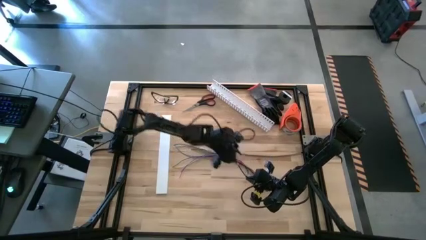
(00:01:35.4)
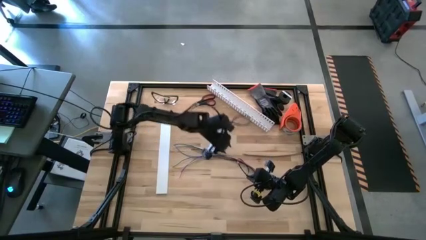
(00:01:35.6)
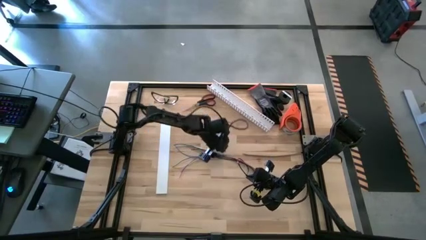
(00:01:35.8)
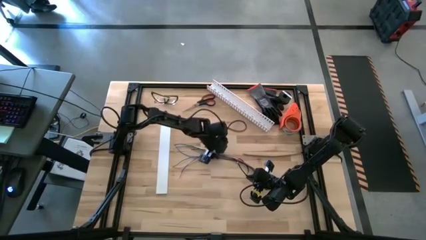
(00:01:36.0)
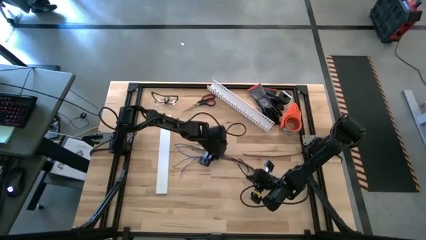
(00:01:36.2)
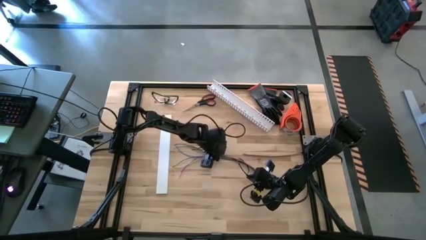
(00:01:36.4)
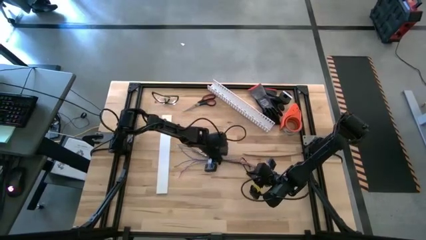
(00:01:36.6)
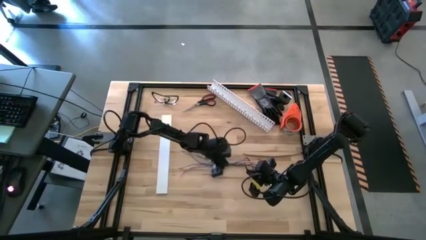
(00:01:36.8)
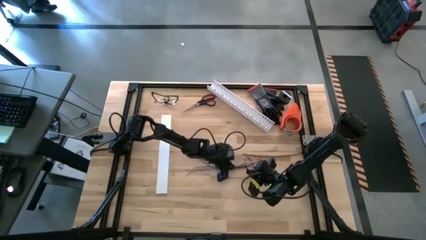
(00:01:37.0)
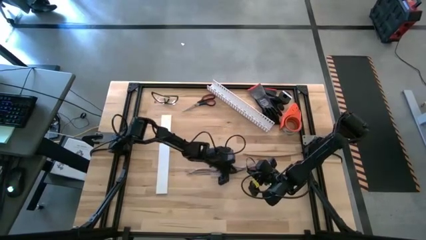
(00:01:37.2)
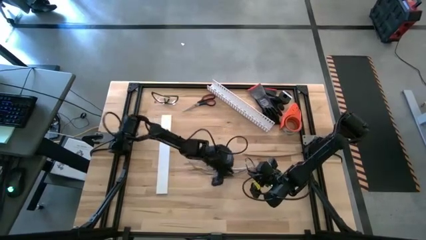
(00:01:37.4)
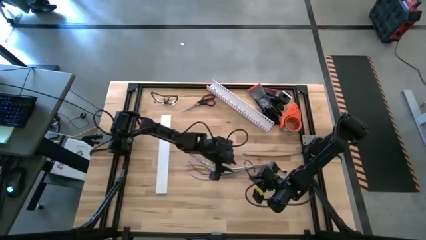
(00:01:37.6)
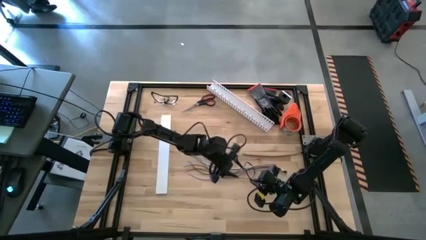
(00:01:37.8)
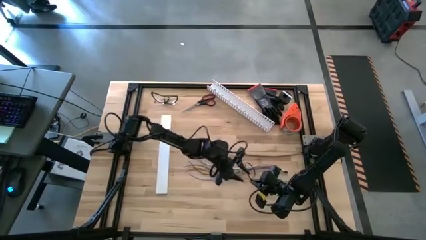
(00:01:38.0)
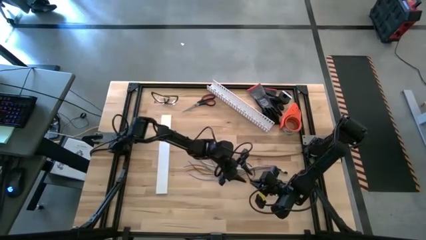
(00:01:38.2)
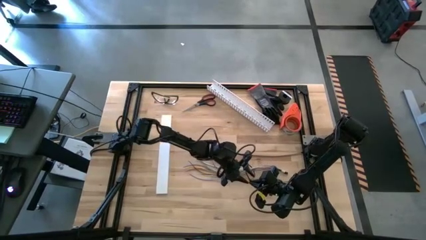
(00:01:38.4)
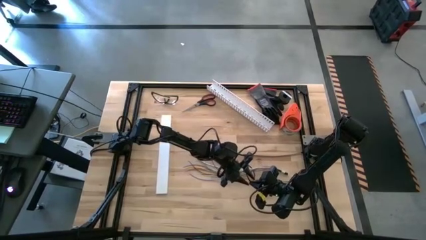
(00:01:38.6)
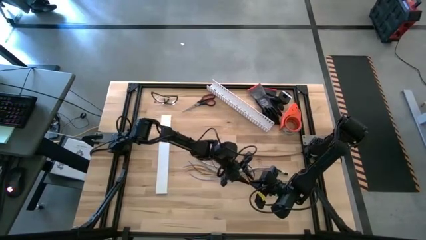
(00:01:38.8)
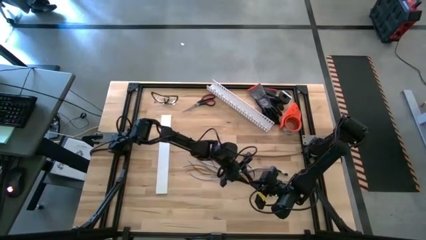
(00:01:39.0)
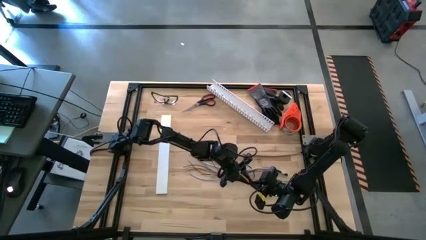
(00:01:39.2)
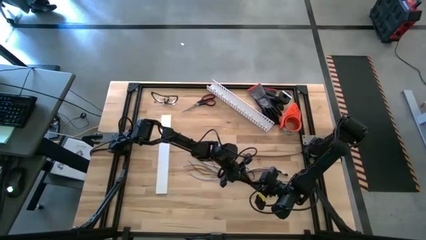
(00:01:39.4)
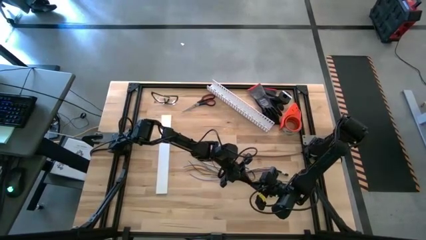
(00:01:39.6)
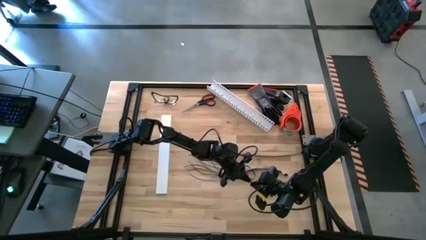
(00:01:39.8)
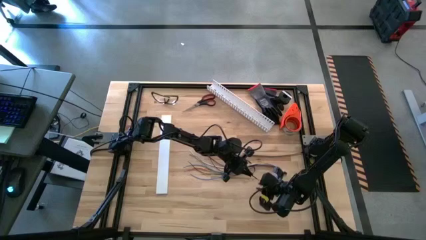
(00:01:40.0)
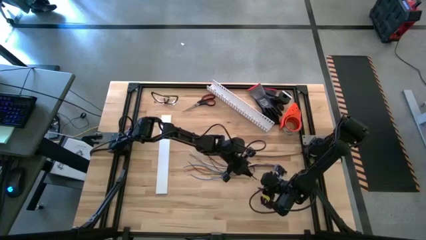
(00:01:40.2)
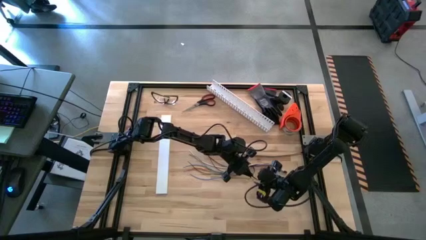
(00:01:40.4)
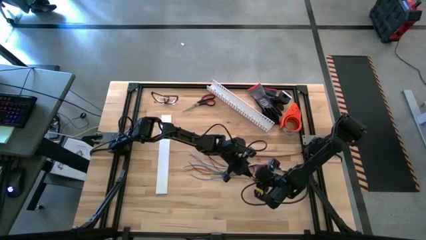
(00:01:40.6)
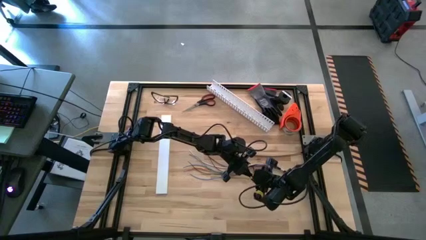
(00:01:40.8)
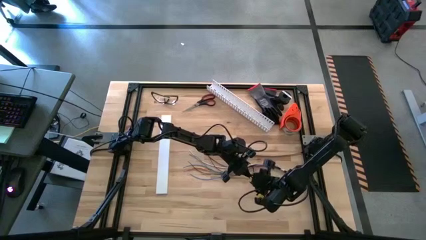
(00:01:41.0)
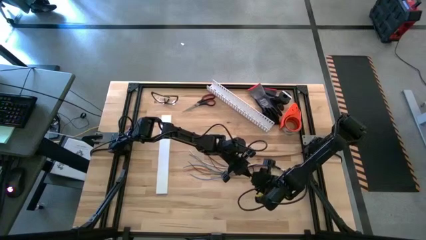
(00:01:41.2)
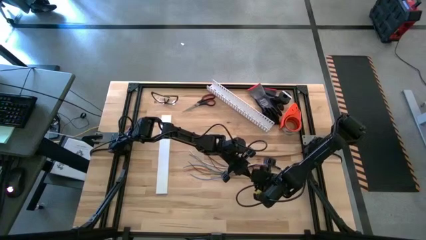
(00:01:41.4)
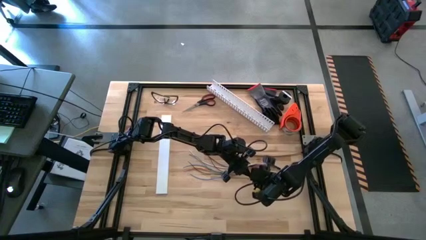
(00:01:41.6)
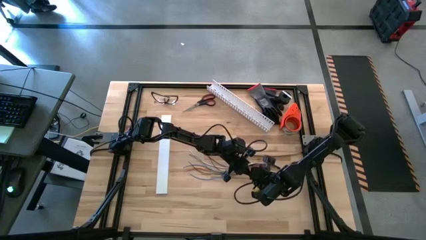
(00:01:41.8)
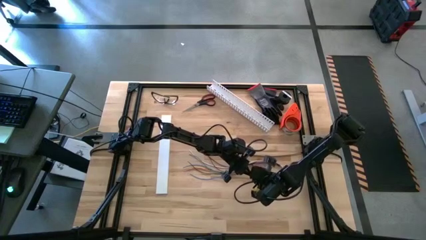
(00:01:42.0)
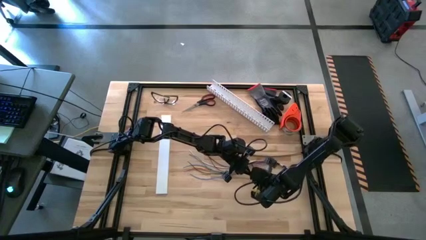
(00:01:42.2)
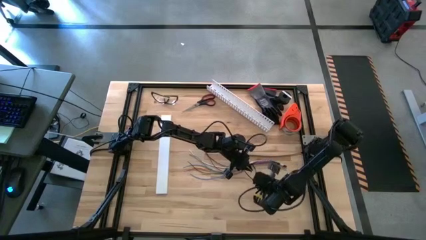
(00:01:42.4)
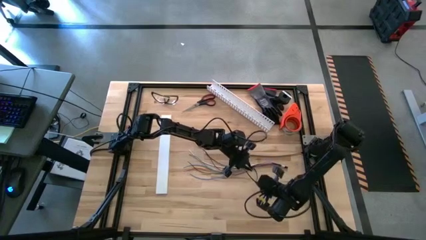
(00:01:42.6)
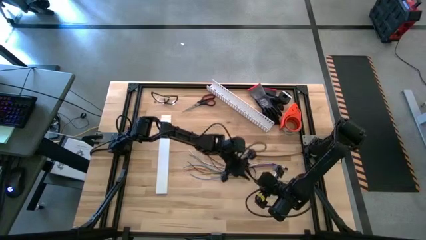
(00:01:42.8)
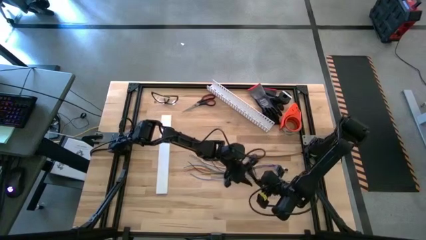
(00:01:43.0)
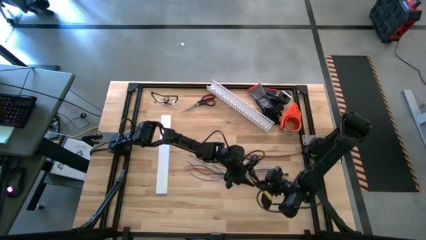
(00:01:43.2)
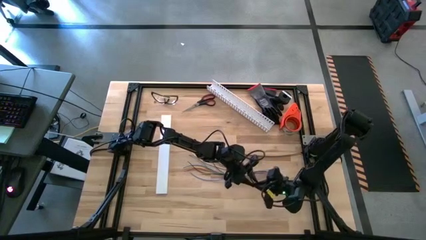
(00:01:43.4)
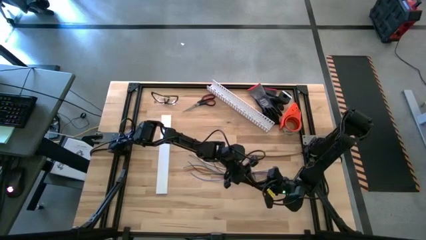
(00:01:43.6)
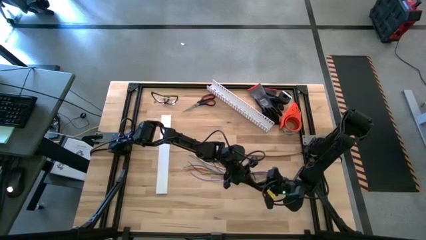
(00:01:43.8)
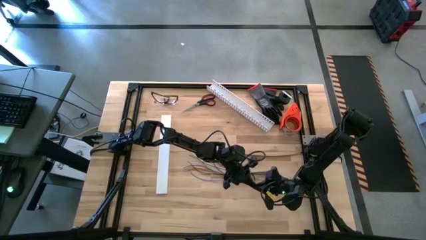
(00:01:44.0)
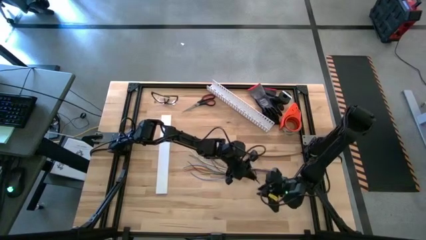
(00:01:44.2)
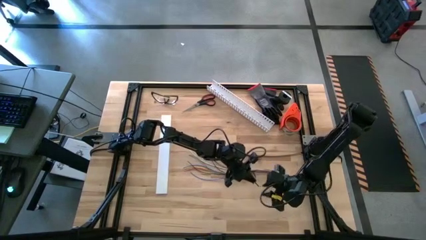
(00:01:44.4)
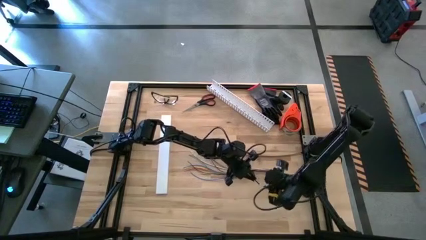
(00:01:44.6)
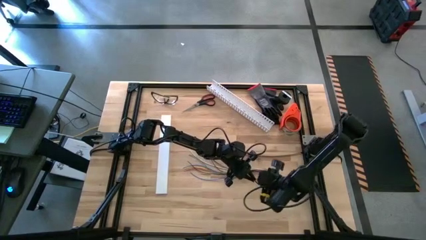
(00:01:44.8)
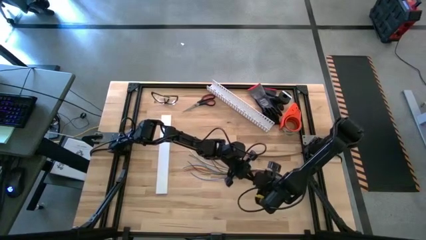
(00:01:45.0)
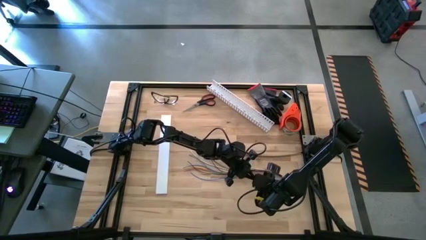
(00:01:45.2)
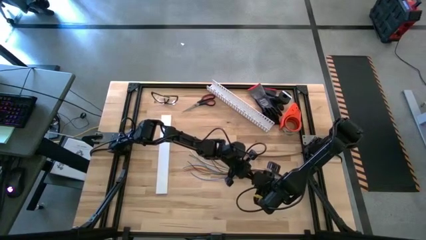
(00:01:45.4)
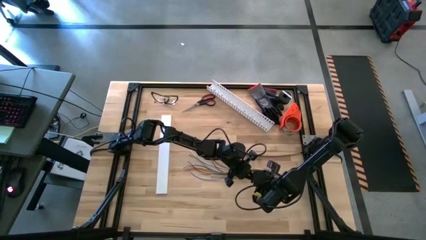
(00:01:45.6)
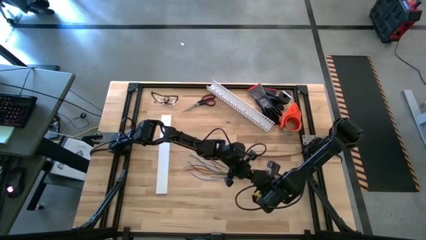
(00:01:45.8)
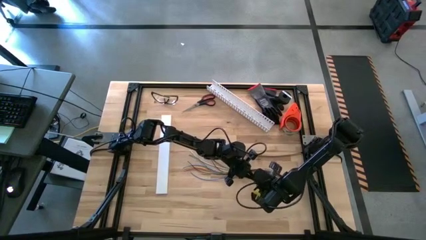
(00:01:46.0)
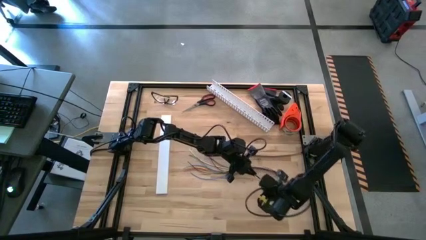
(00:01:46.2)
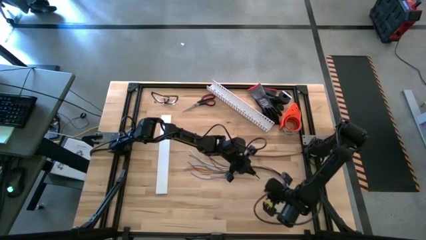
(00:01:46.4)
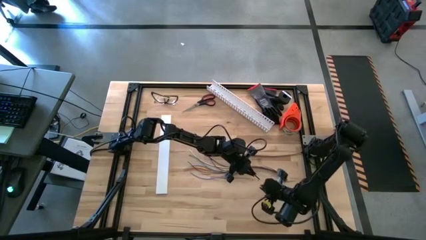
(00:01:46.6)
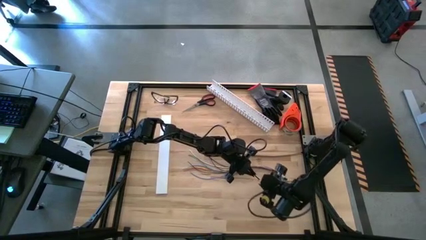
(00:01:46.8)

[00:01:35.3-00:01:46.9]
Task: Ziptie cables
Wrap the bottom black zip tie on the cable wires
